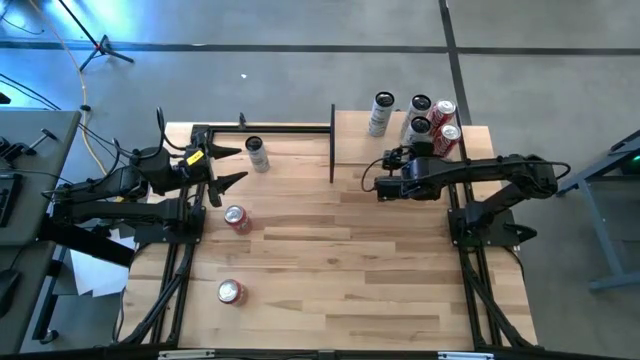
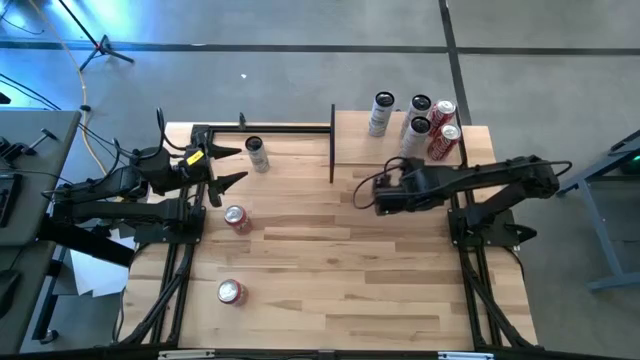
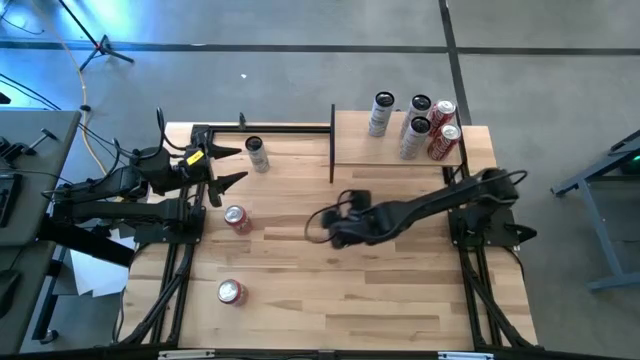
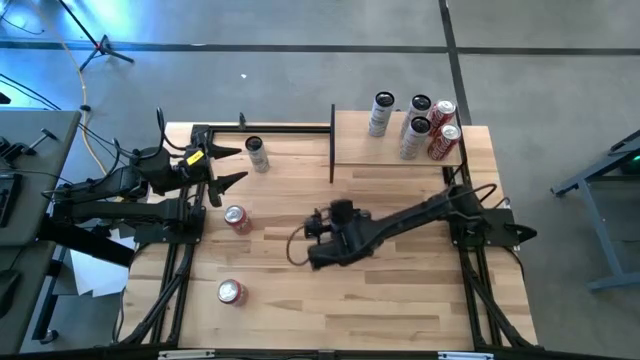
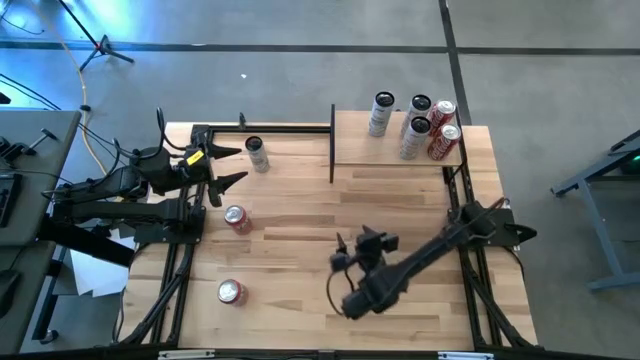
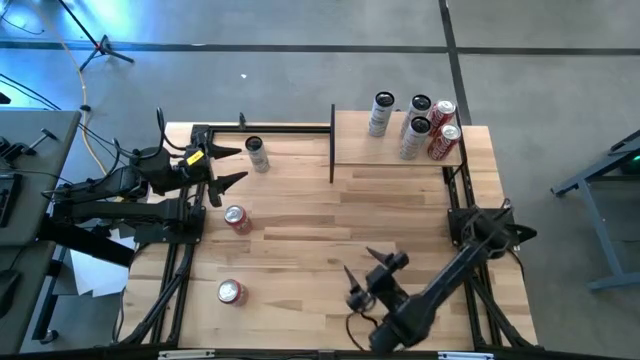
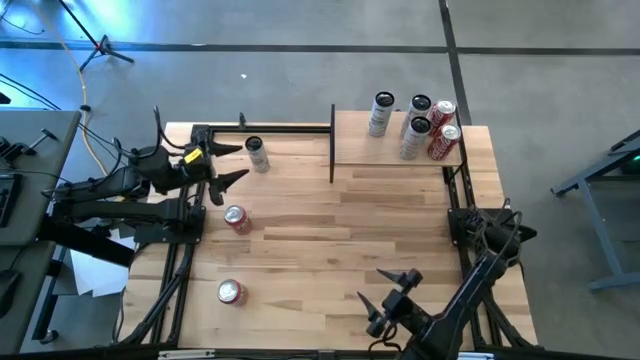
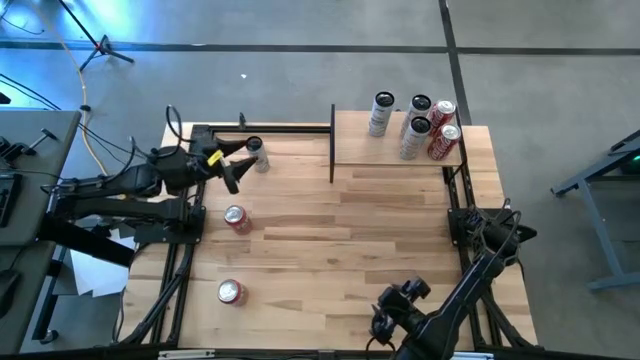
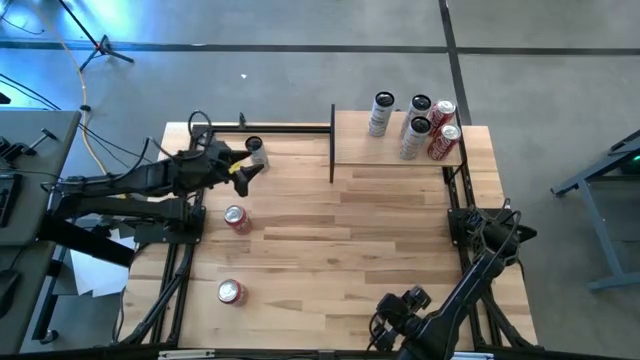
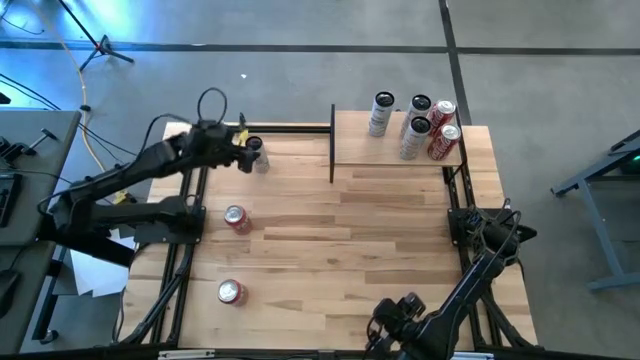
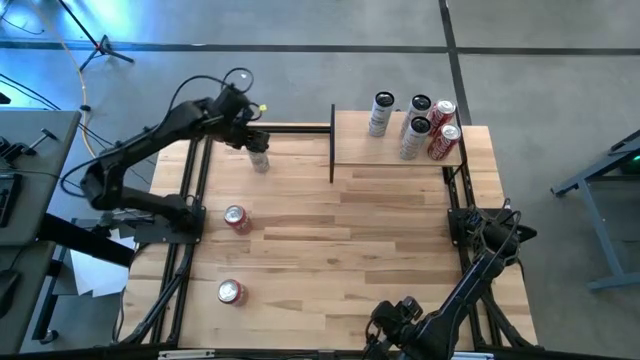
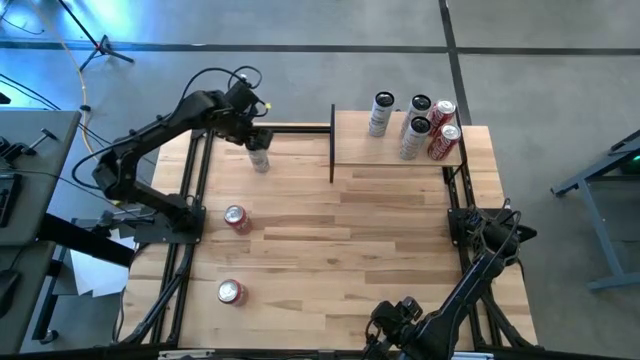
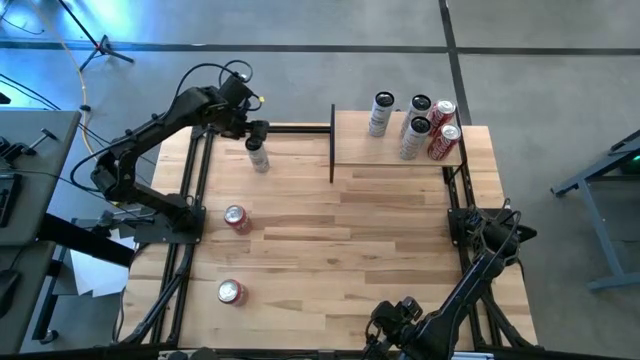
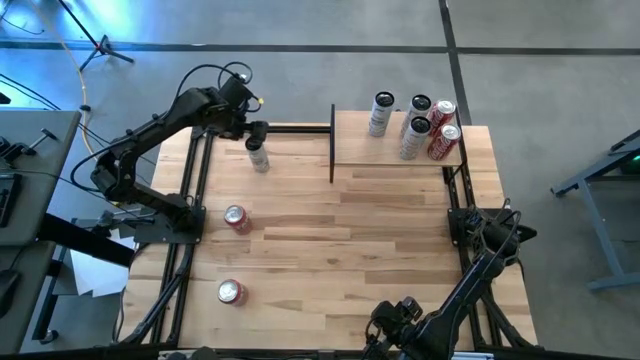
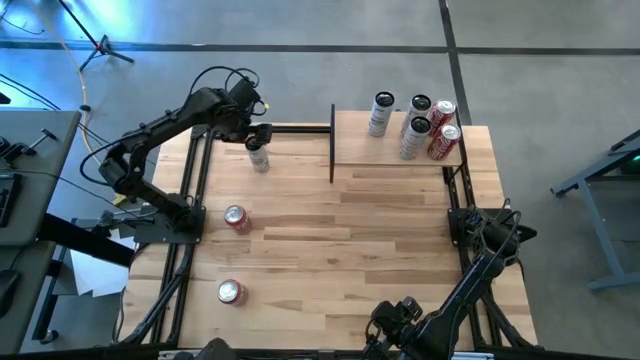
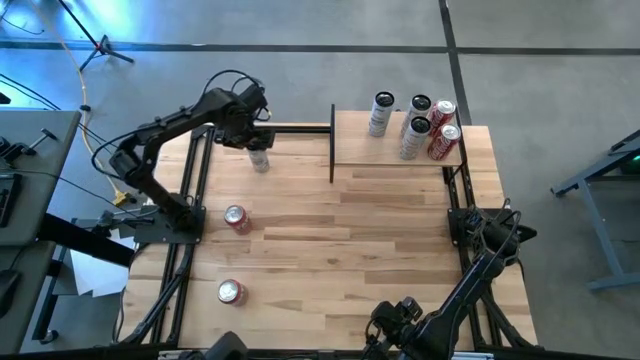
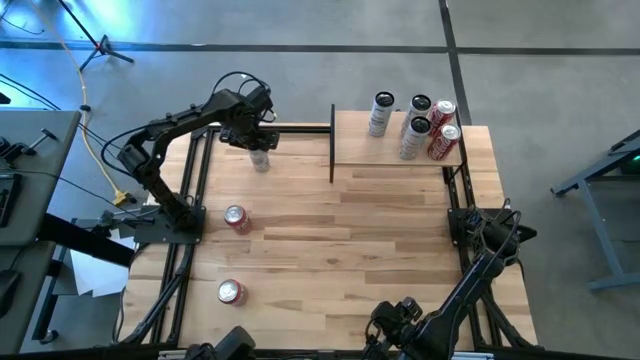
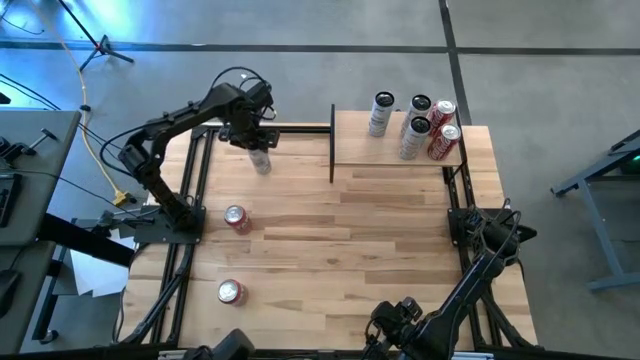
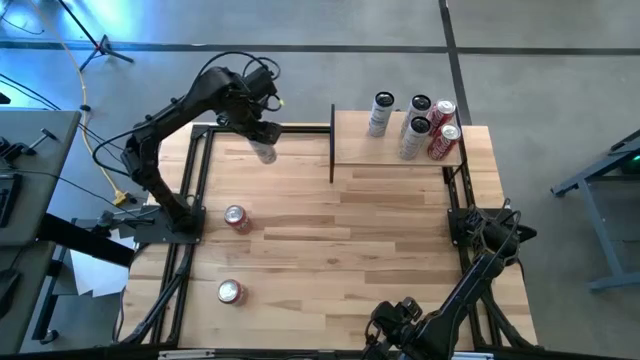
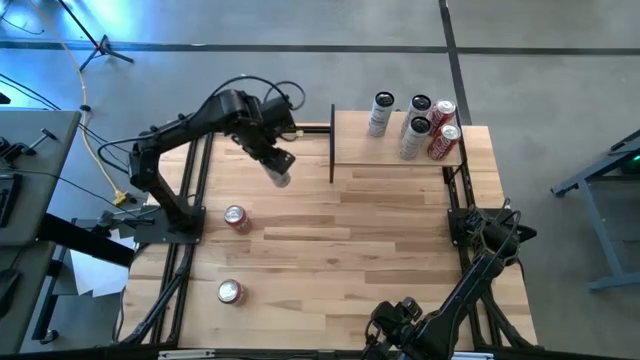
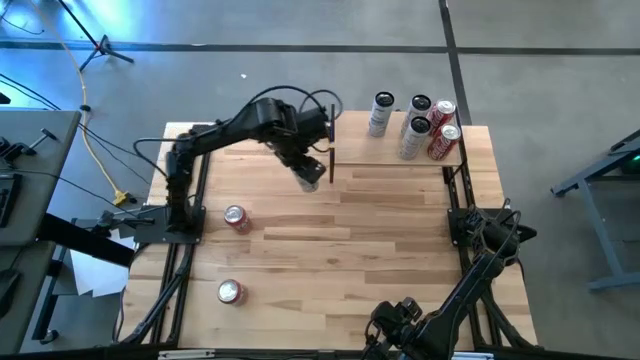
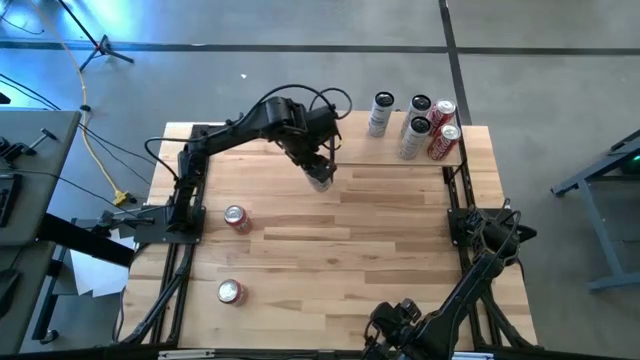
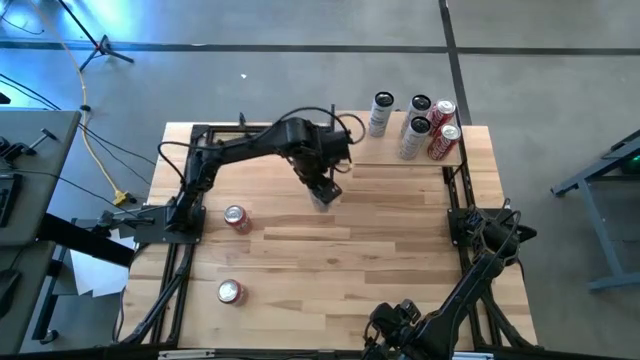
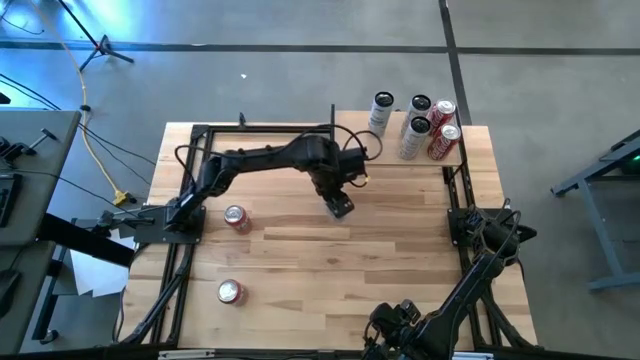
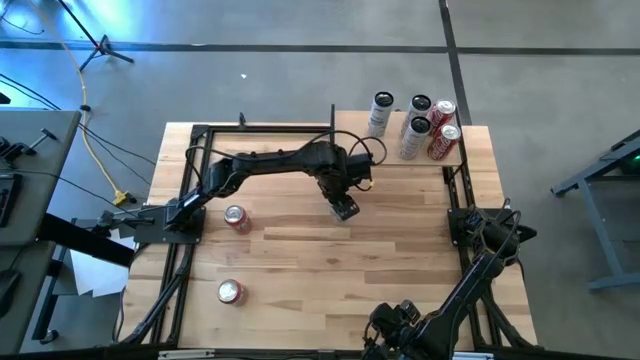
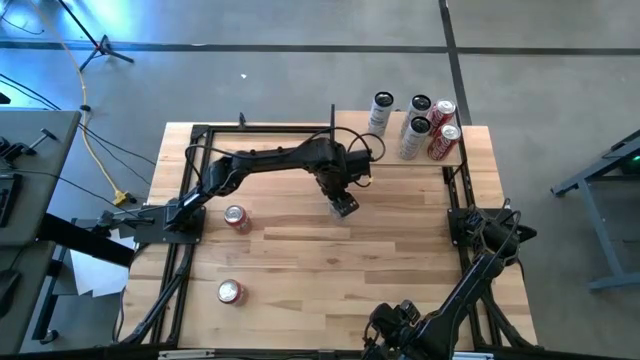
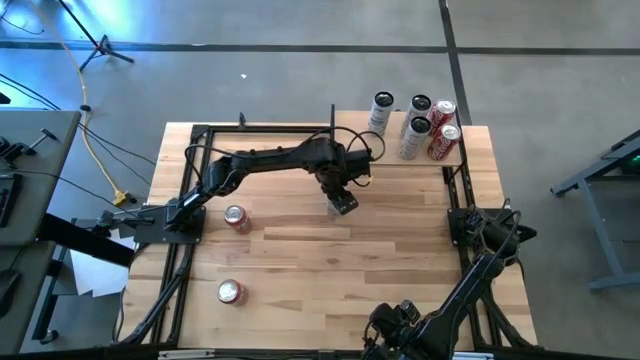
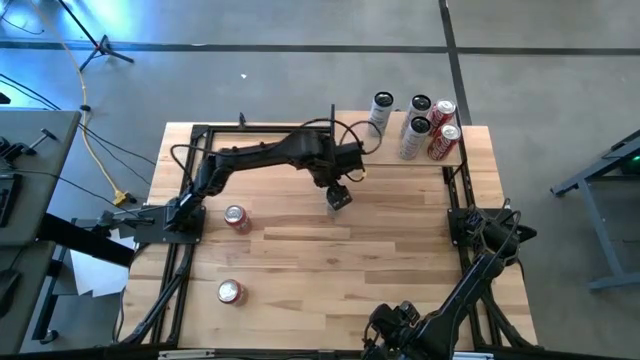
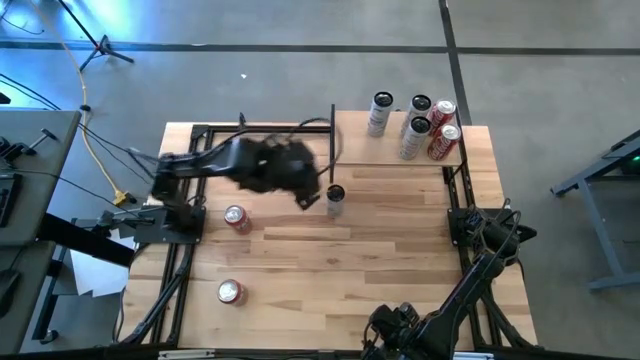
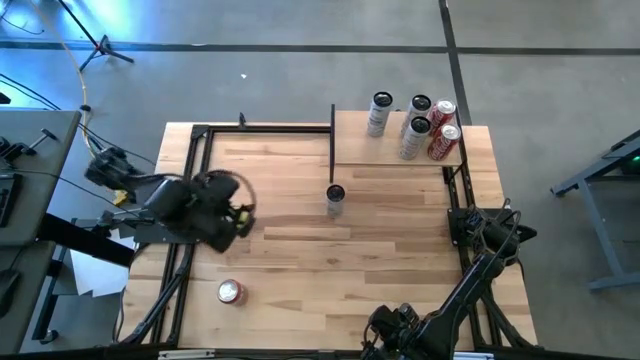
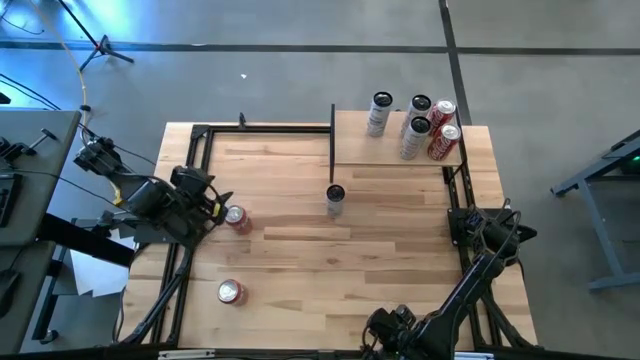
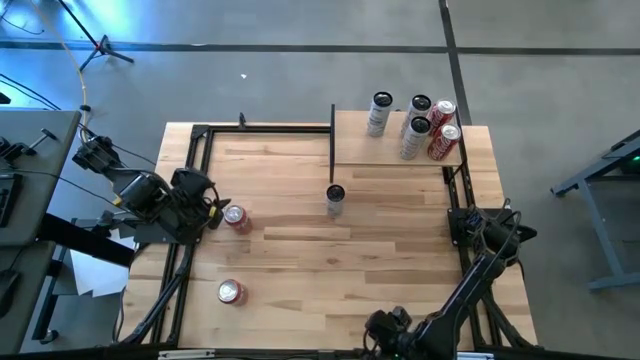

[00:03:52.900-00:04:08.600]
Task: Place canned beverage on shelf
Put the white soda can on the shelf aligned with the other white soda can

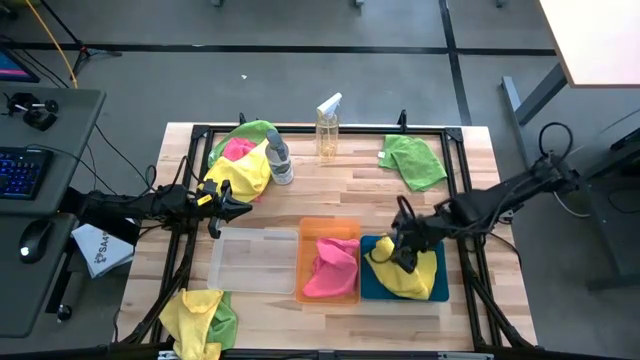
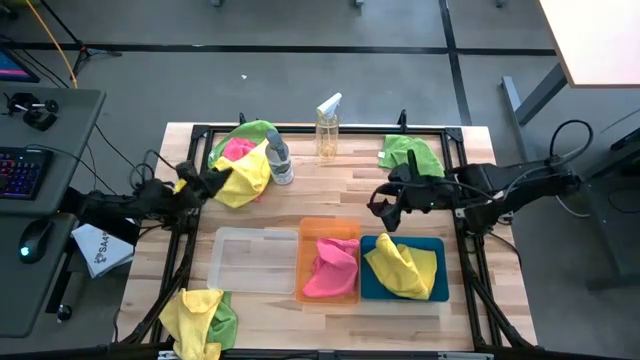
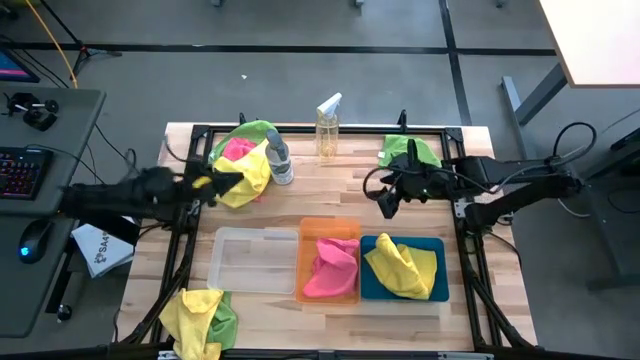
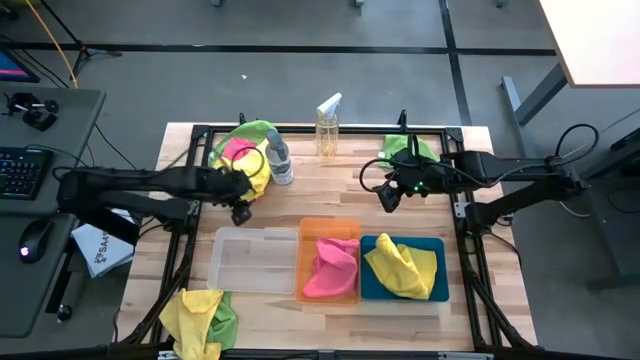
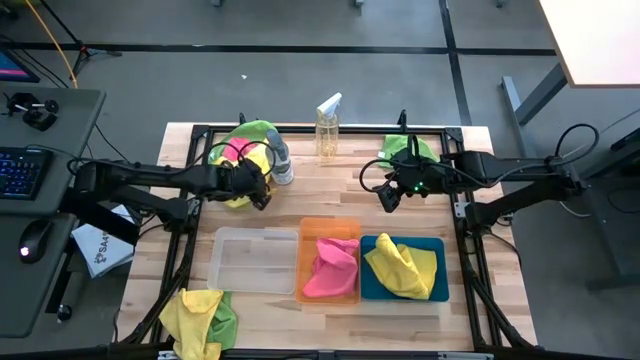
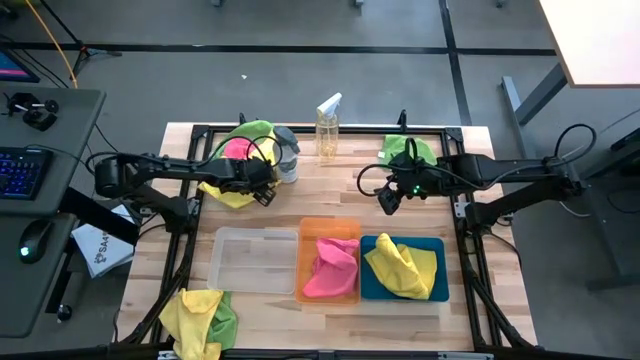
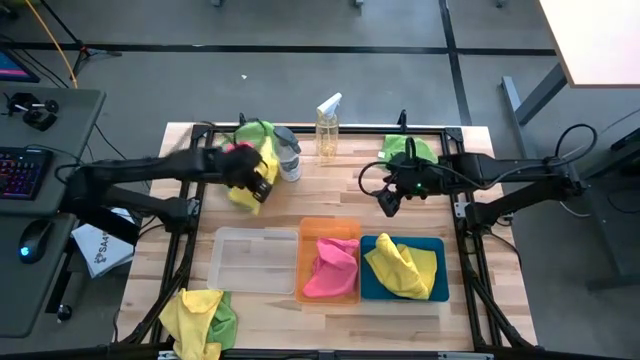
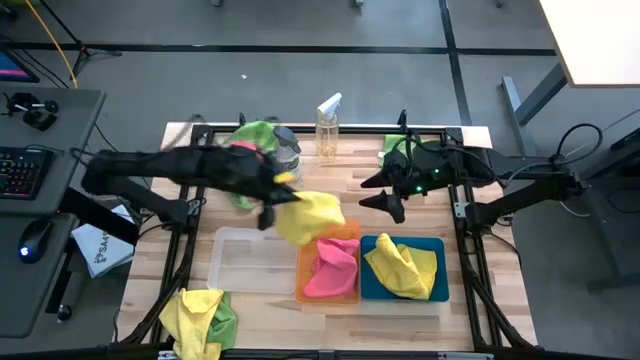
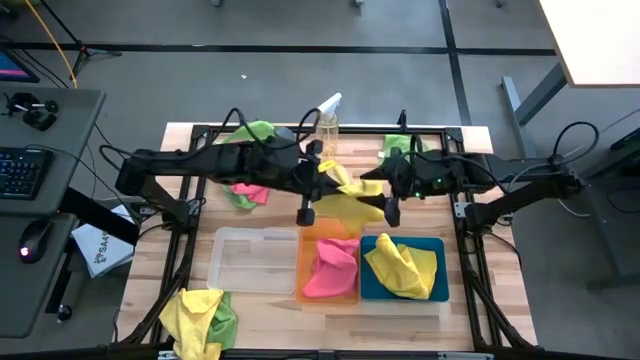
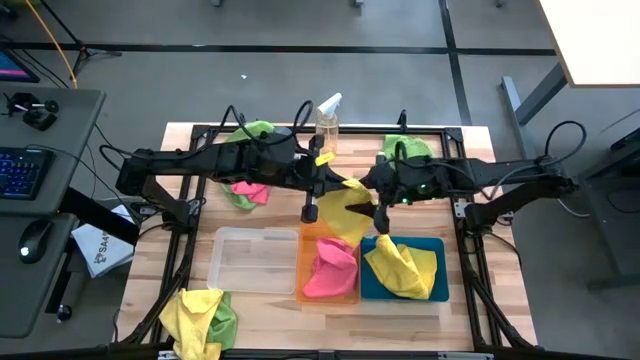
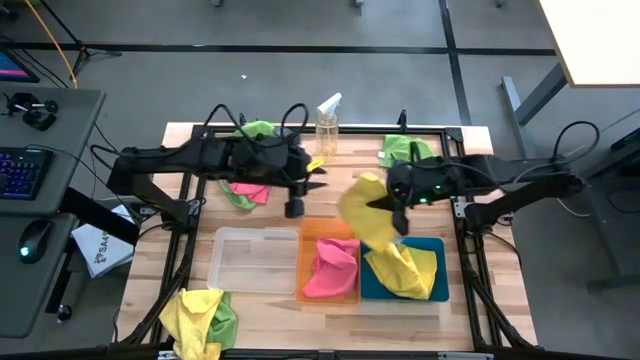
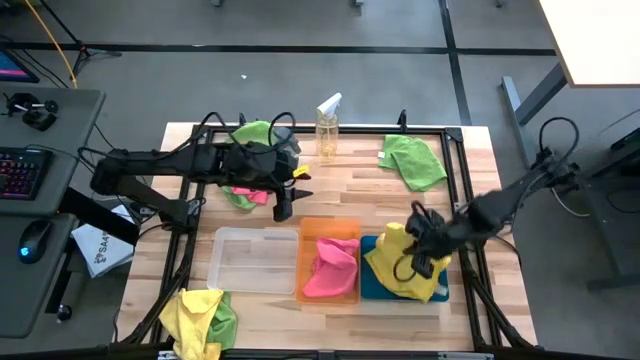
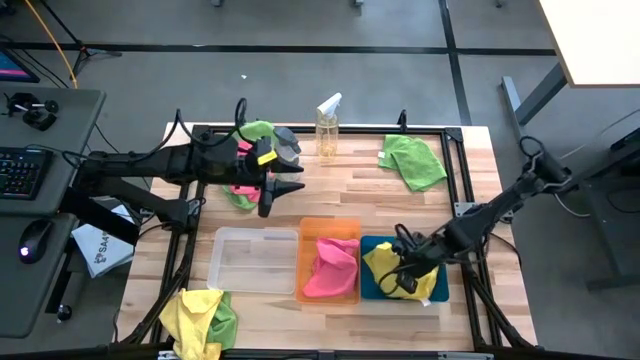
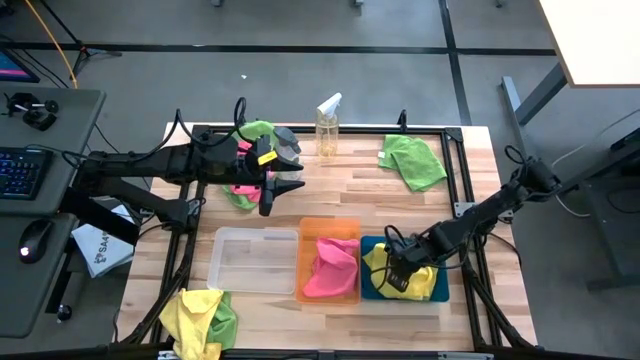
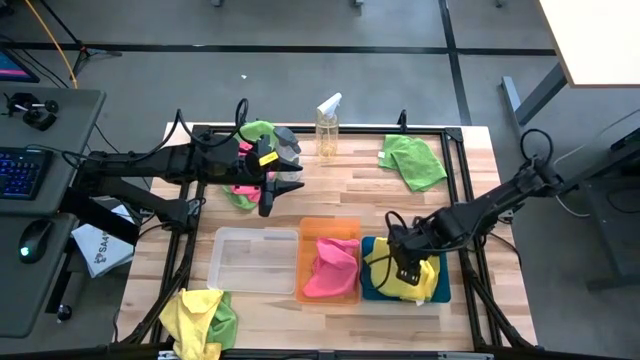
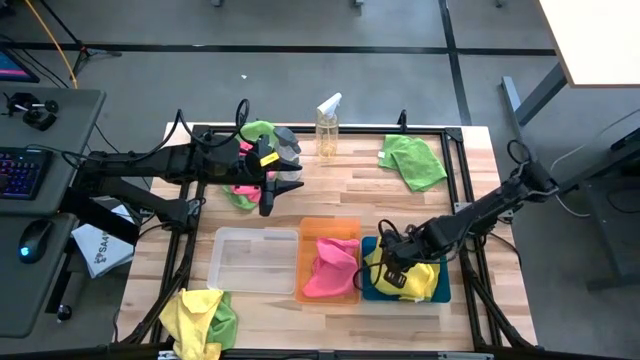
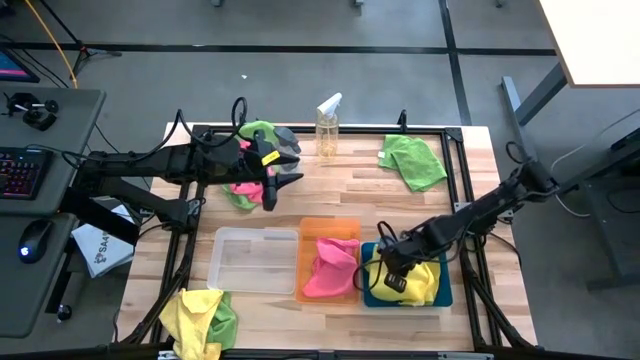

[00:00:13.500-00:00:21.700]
Task: Sort microfiber towel by color & place in baskets
Put the top yellow towel into the blue bin
